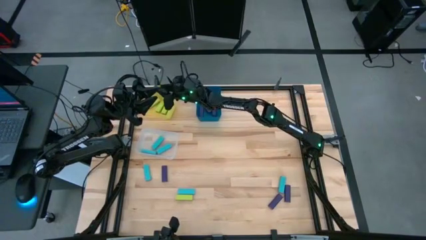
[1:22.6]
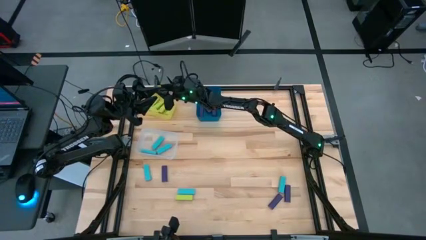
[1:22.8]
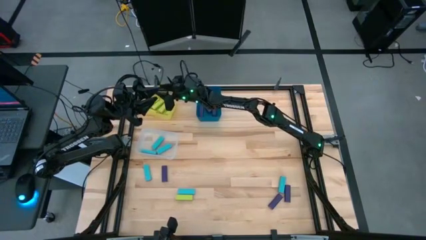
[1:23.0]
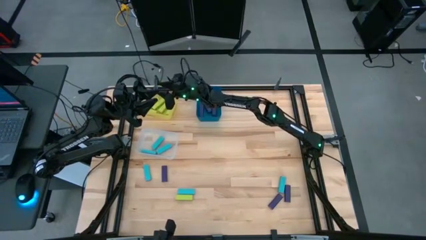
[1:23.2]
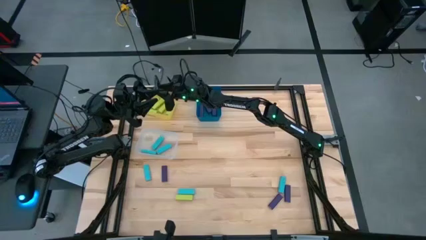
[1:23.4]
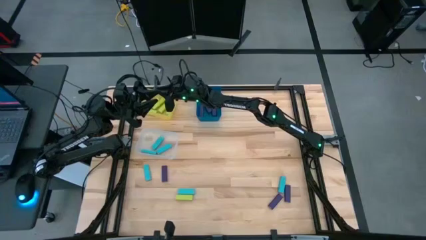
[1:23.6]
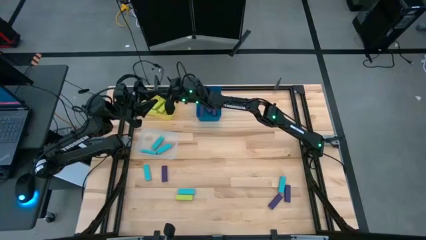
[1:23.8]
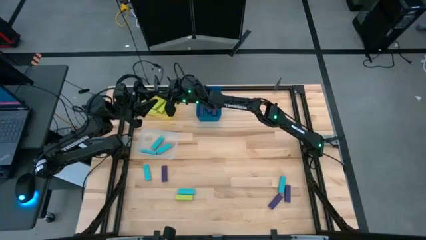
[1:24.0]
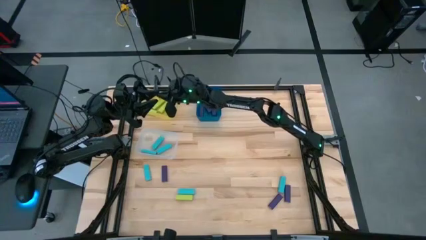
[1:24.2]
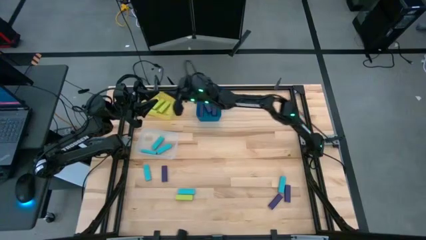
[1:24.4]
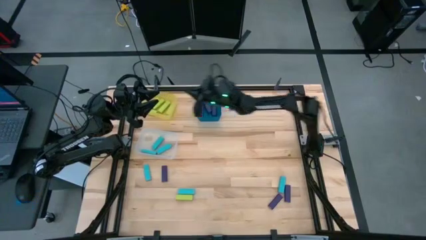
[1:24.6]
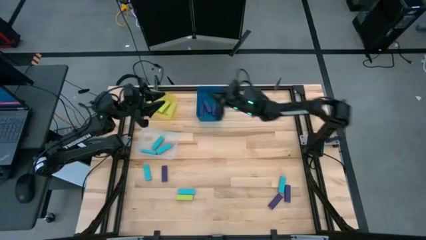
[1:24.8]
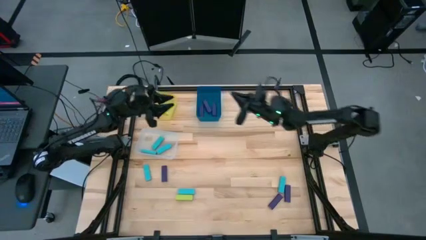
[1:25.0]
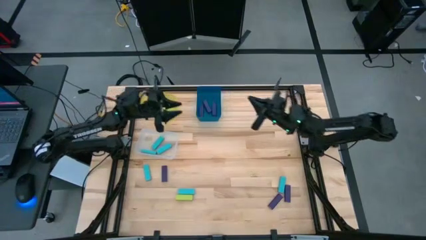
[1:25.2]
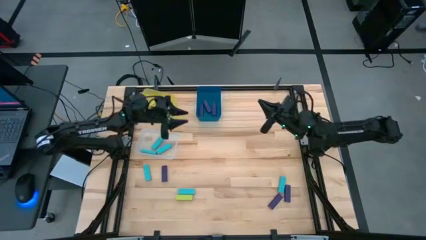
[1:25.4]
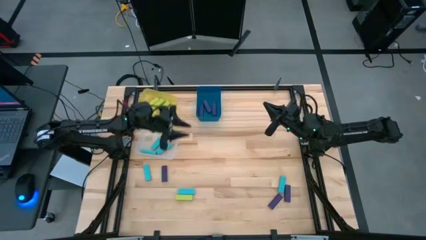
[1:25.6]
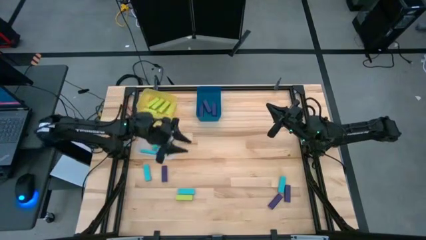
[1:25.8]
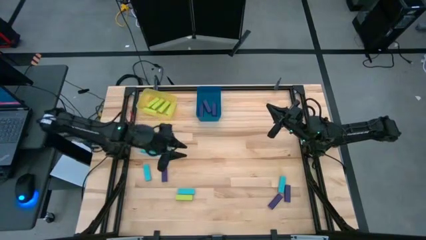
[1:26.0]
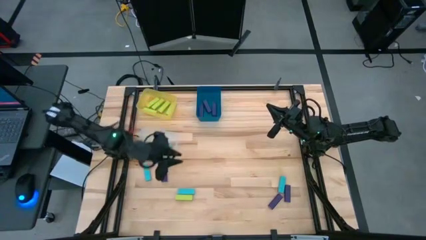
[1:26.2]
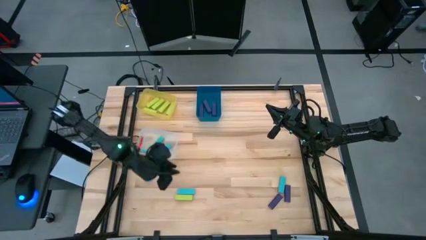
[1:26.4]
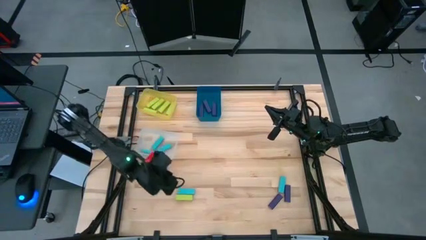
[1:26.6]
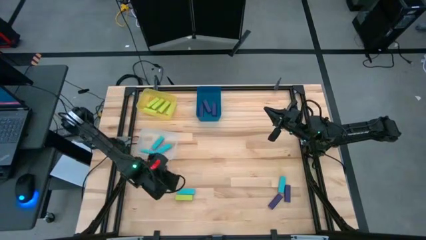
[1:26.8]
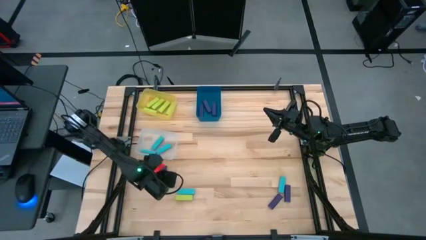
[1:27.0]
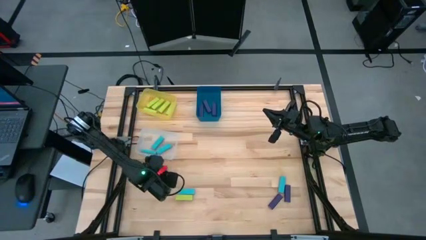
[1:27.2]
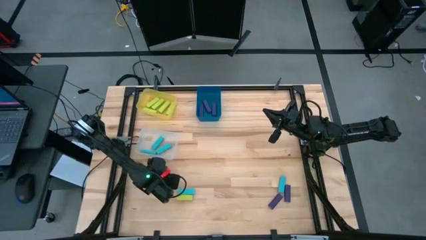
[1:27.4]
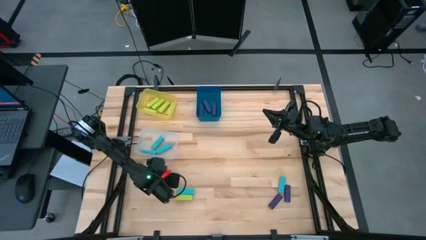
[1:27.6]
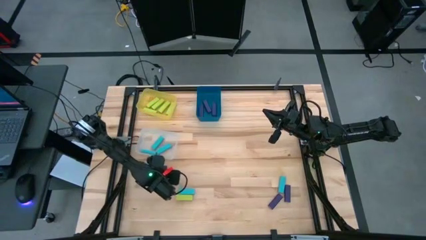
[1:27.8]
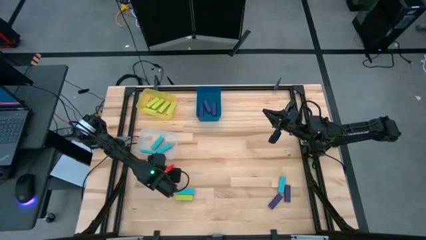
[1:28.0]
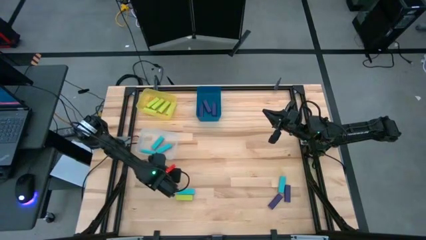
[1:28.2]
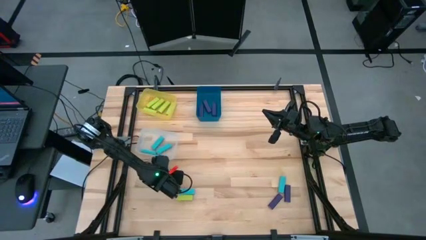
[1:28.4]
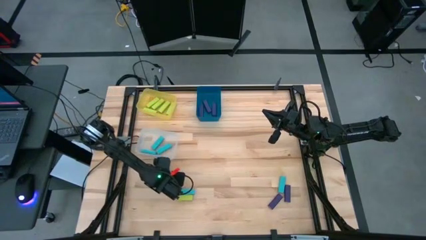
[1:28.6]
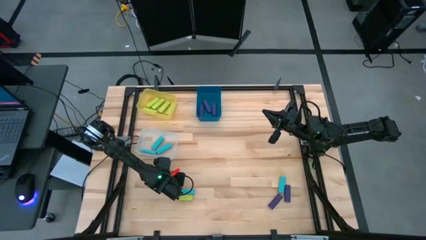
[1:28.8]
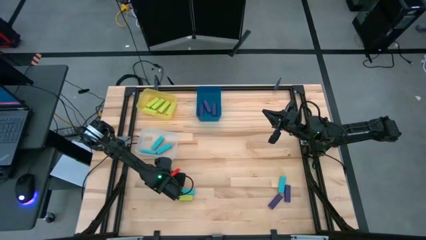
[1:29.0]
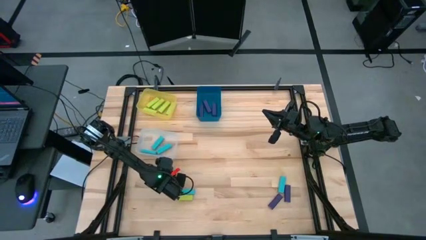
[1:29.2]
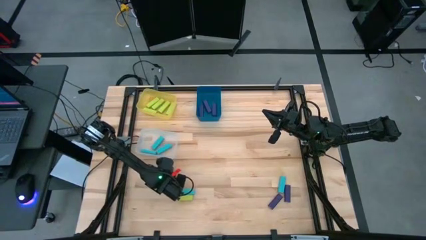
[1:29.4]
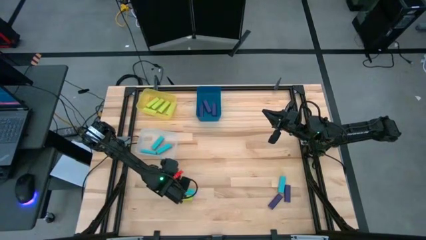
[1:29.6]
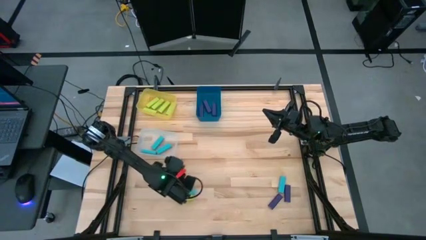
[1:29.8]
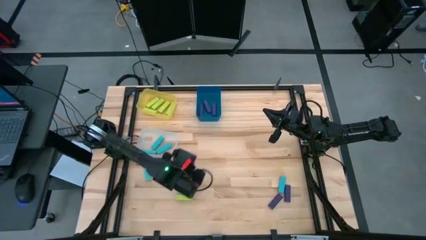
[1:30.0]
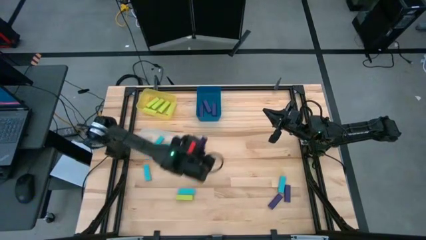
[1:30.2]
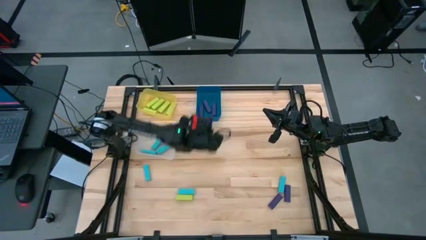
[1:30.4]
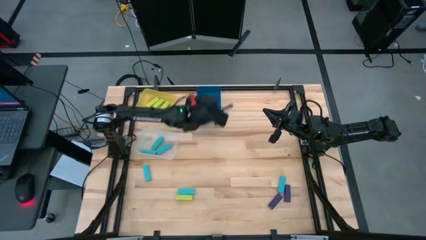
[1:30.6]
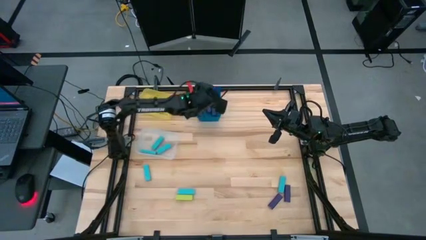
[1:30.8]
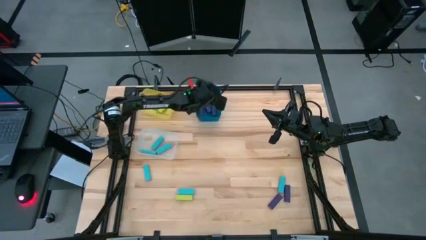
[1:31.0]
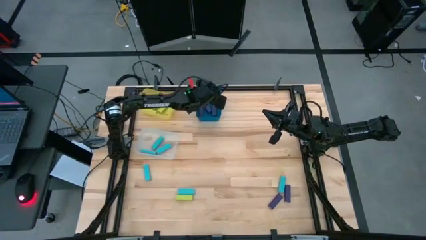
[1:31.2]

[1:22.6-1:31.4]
Task: Sort blocks
Put the purple block into the blue bin

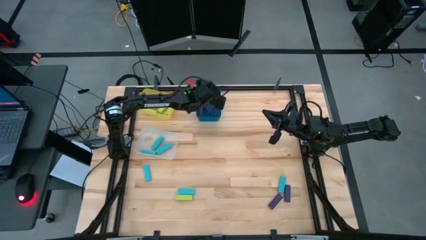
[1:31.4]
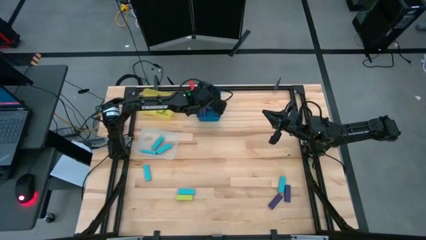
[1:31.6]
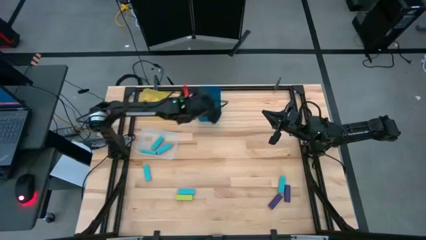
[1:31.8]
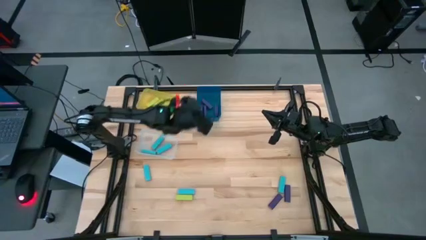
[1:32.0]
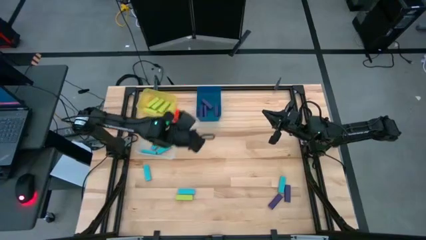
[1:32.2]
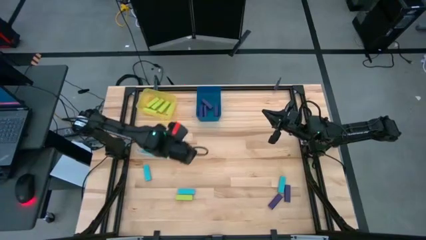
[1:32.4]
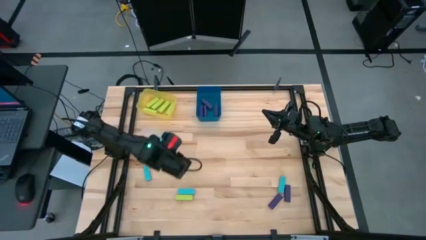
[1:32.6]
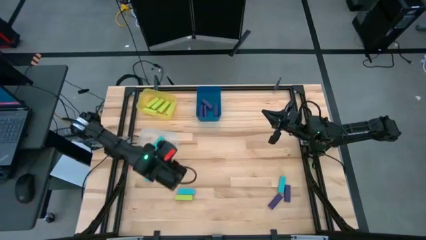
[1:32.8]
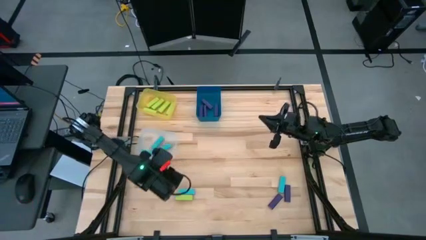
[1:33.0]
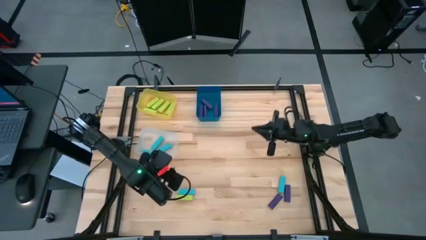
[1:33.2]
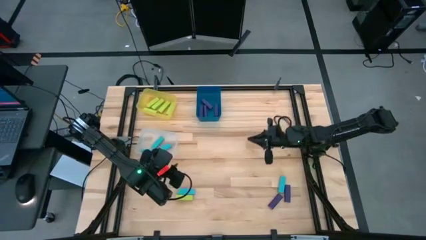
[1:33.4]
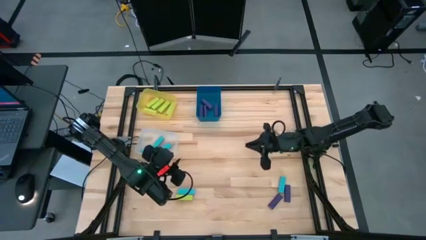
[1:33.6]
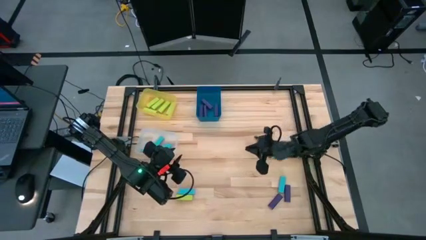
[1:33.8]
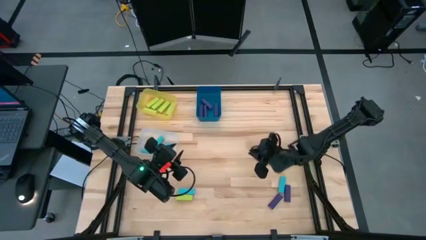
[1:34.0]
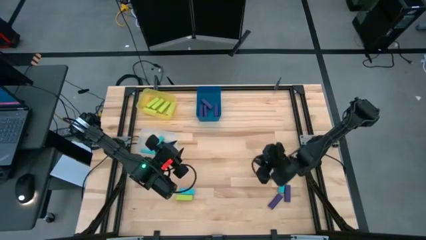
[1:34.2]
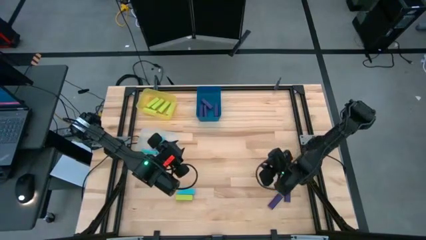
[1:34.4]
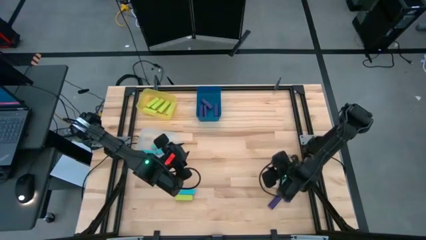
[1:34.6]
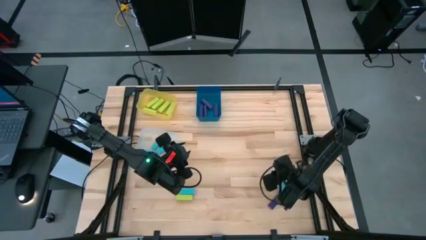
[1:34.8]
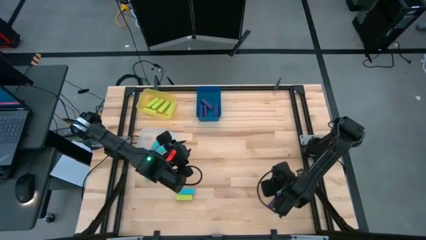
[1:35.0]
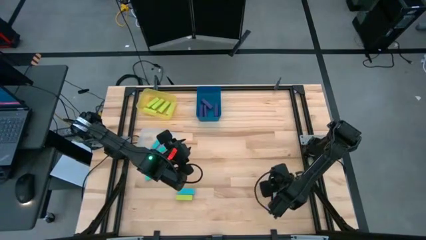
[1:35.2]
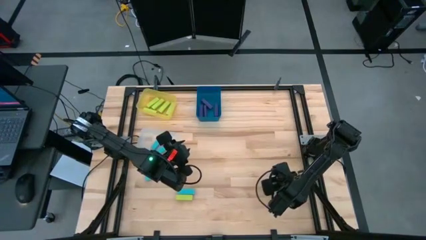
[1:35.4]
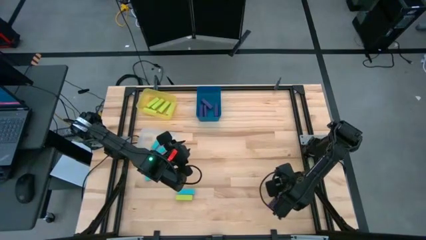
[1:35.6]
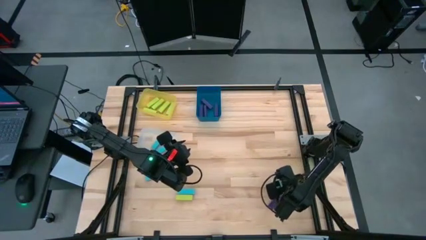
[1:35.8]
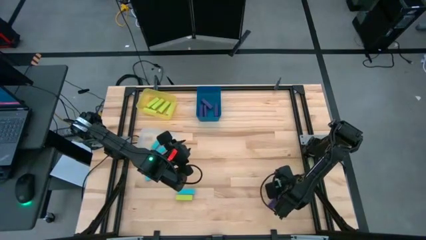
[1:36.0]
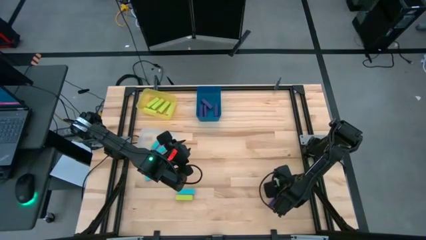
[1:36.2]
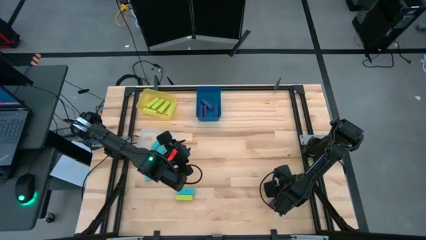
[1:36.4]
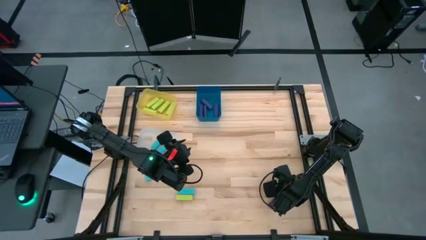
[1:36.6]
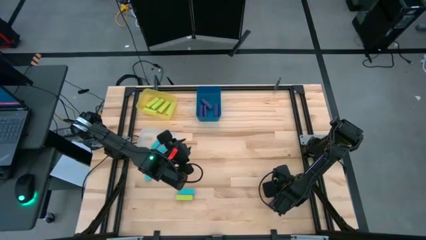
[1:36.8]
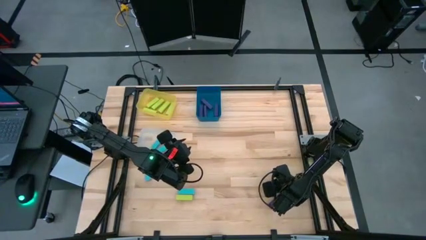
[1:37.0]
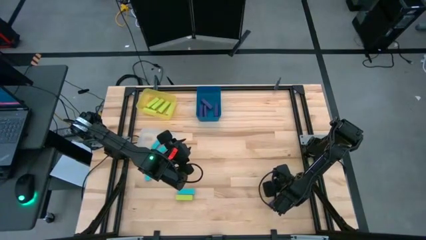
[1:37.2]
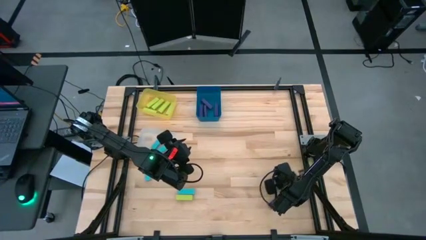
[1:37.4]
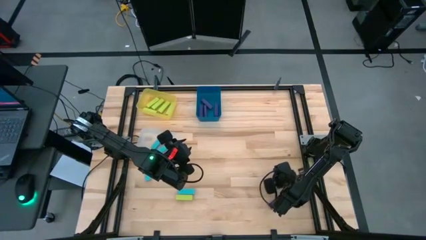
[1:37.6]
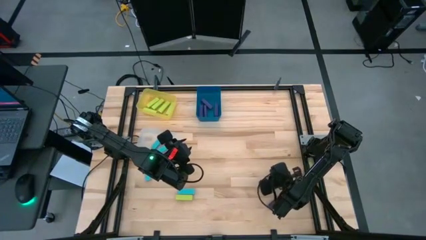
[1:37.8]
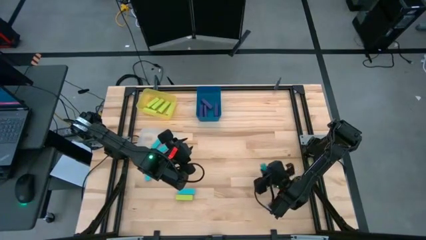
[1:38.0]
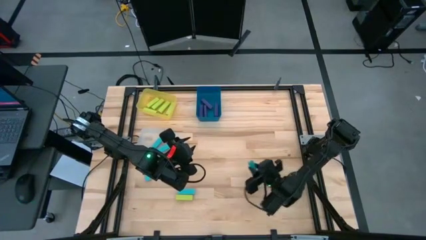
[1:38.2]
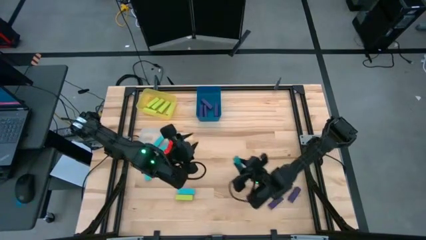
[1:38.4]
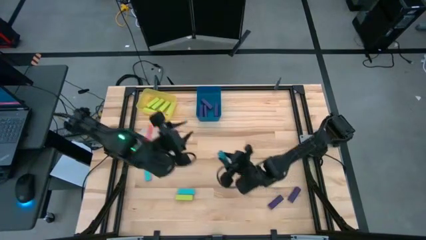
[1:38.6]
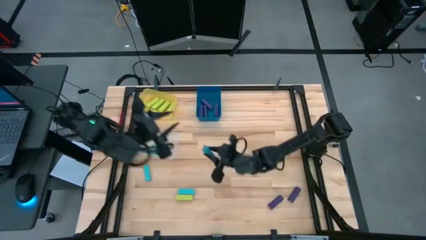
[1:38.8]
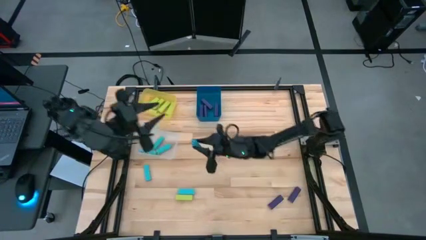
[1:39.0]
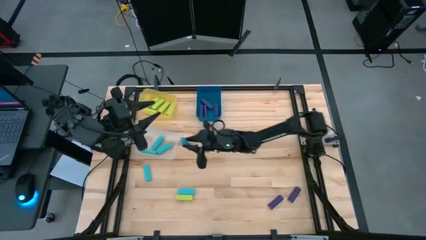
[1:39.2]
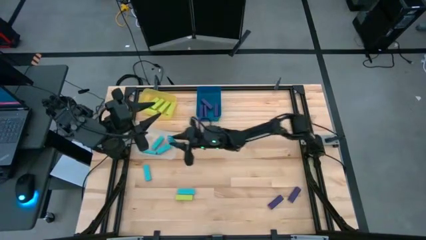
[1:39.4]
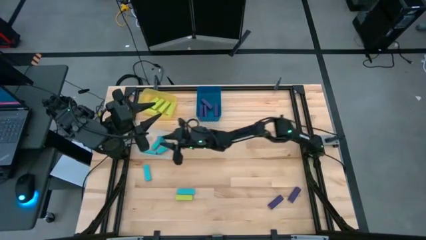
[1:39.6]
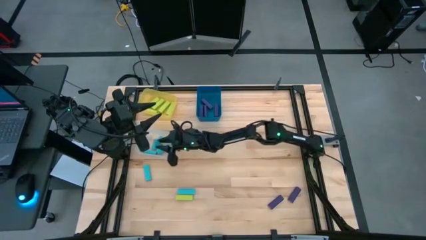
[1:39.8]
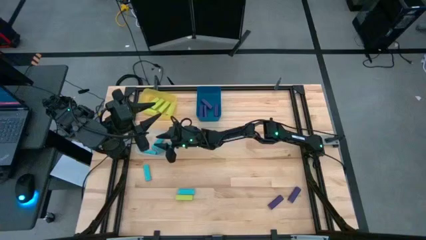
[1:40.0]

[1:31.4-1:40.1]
Put the blue block into the white bin
